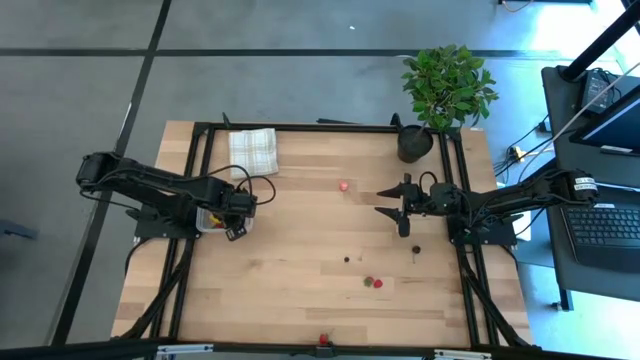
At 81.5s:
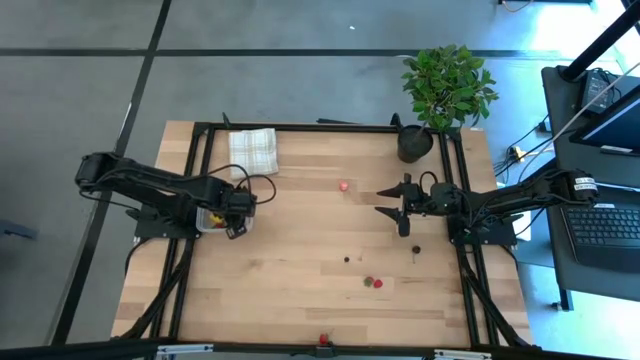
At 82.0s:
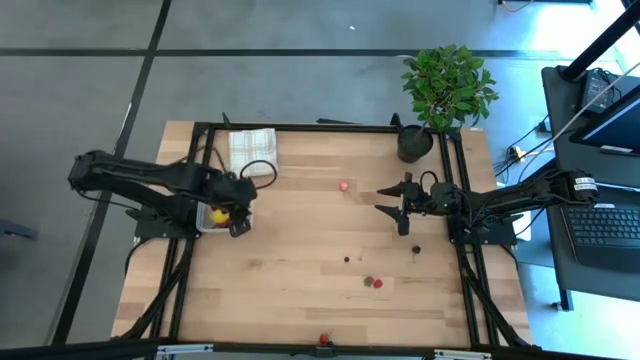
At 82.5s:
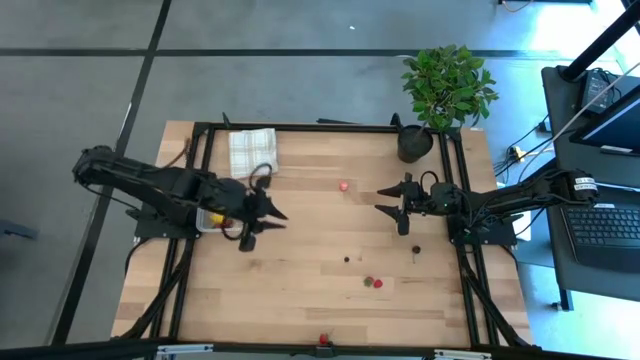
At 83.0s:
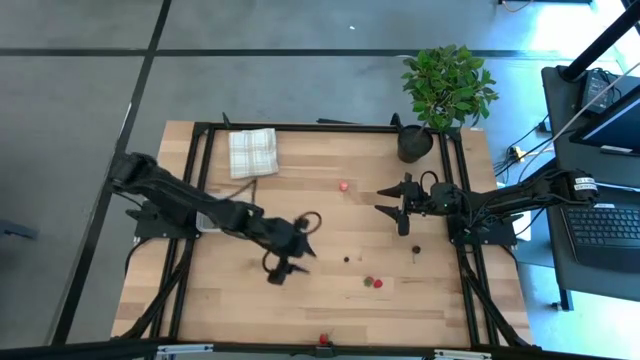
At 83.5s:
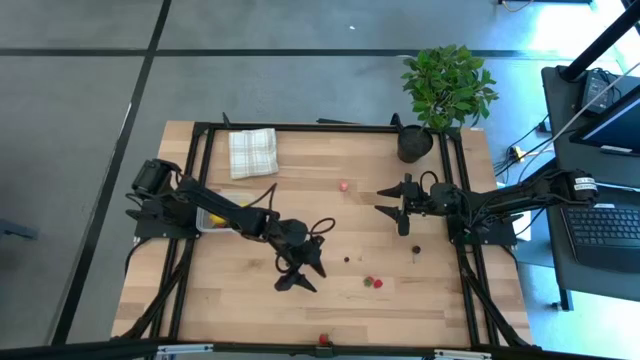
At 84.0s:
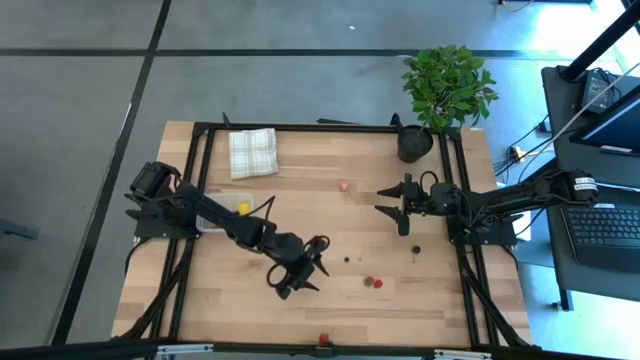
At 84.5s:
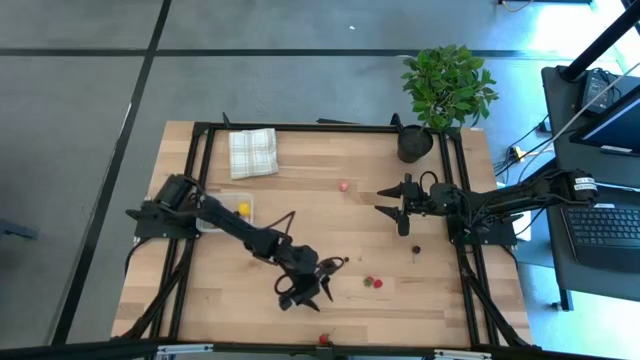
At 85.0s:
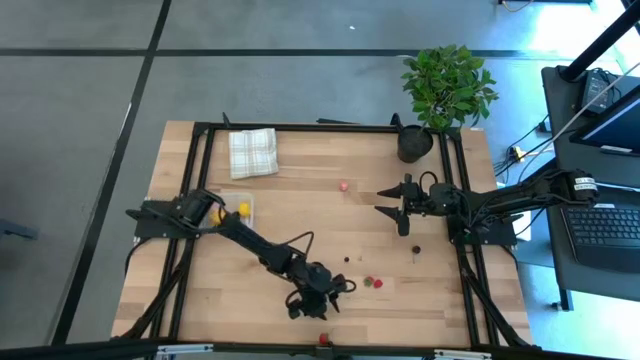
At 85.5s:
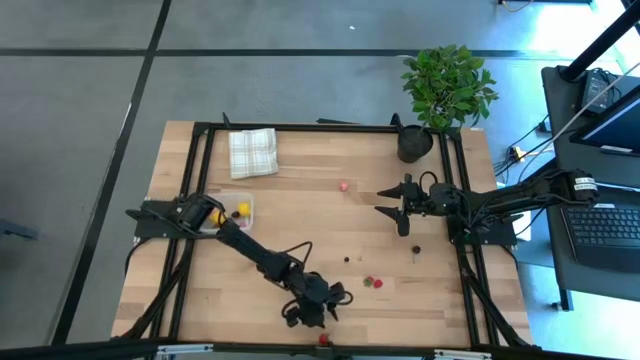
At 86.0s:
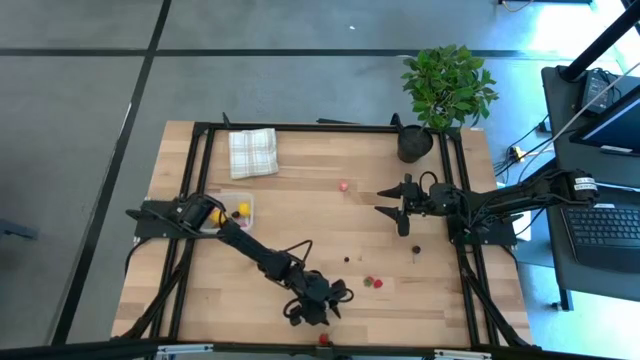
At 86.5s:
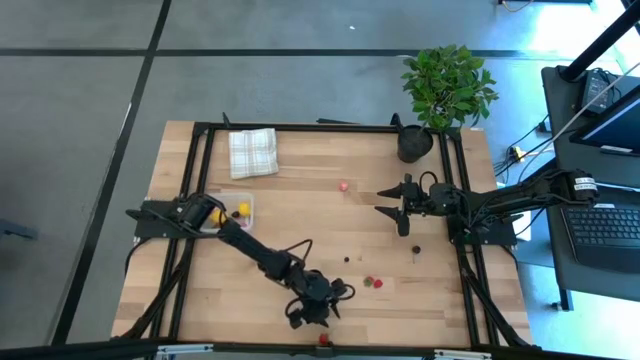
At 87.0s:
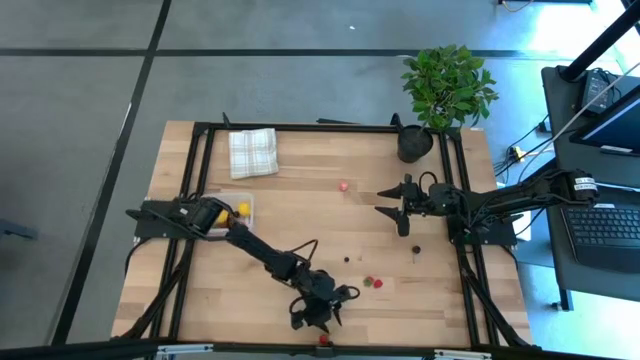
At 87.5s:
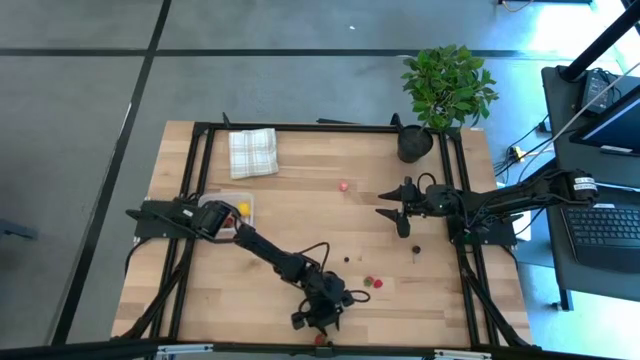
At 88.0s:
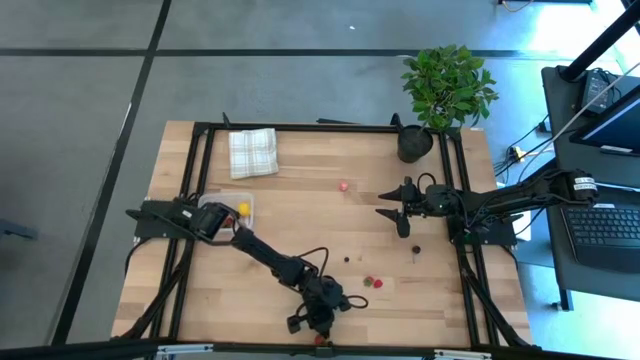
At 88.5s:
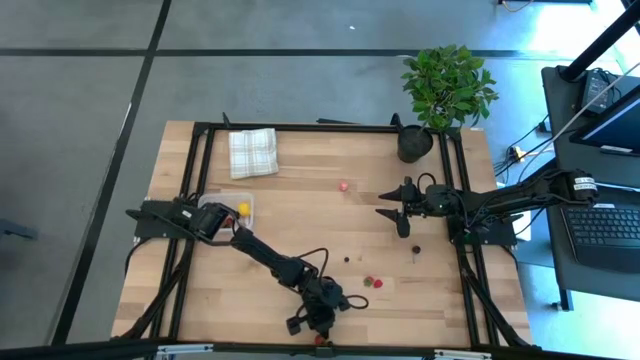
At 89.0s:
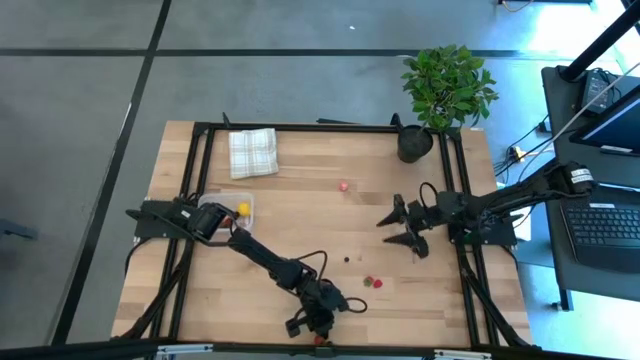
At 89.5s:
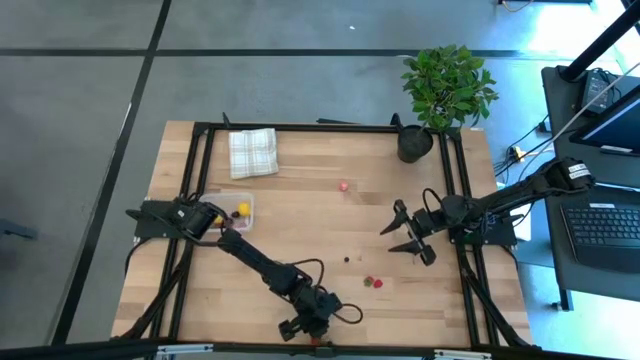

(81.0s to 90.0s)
Task: Pick and placing Produce into tupperware
Put the bottom red strawberry into the transparent bin

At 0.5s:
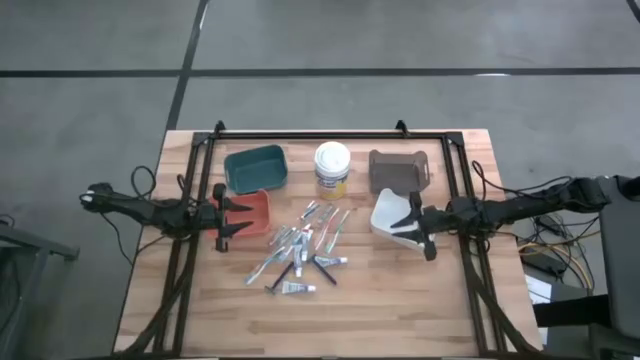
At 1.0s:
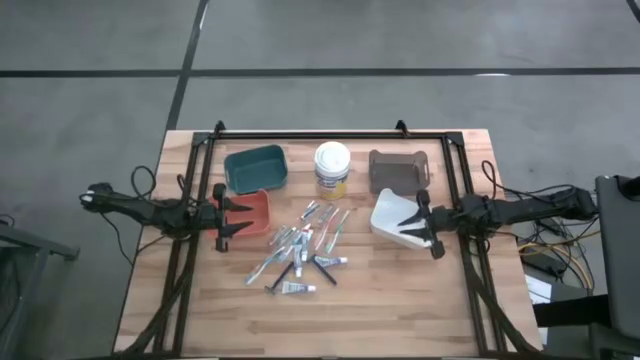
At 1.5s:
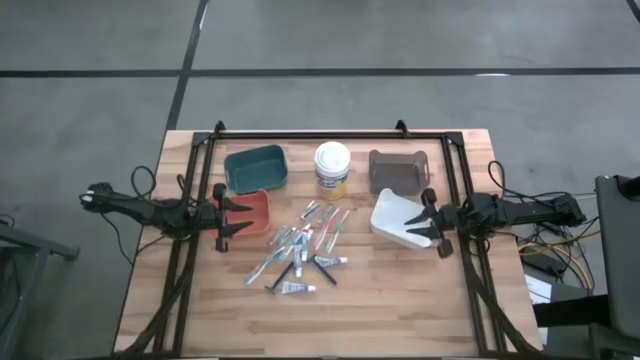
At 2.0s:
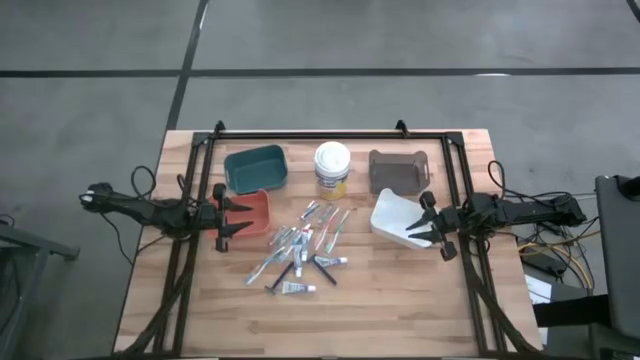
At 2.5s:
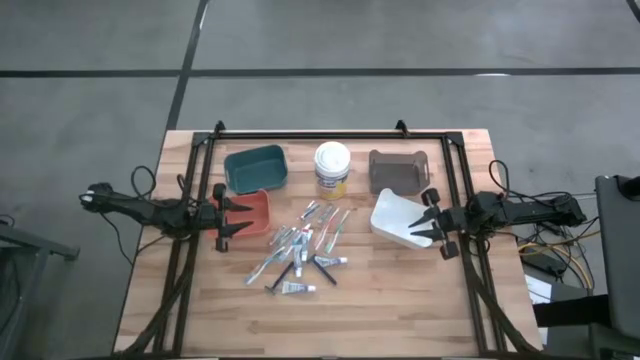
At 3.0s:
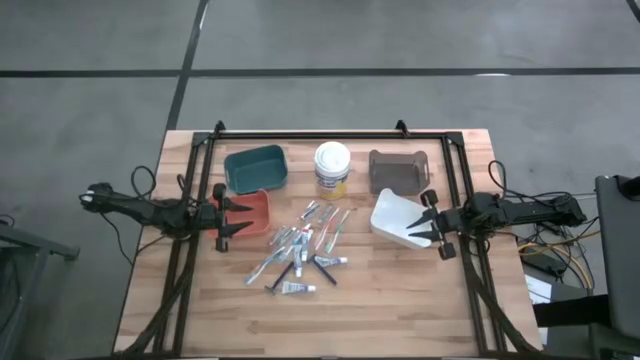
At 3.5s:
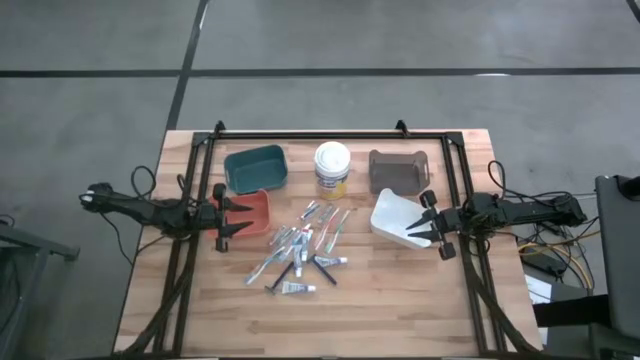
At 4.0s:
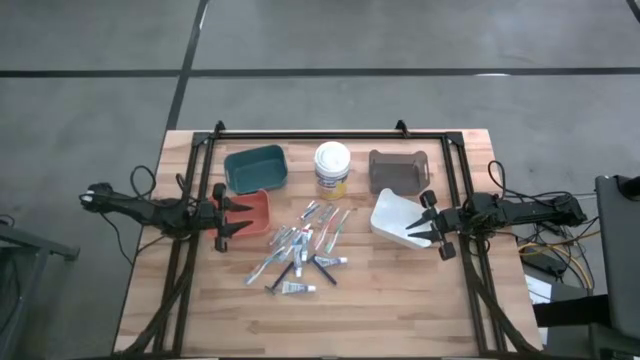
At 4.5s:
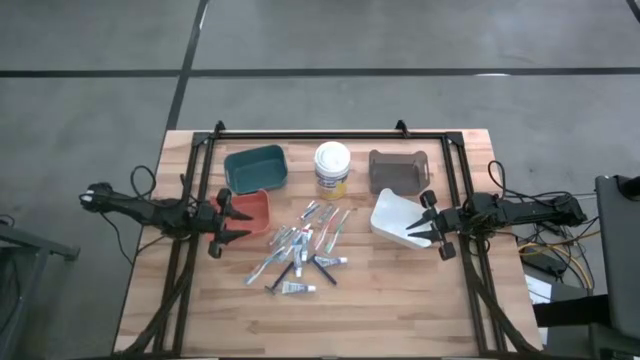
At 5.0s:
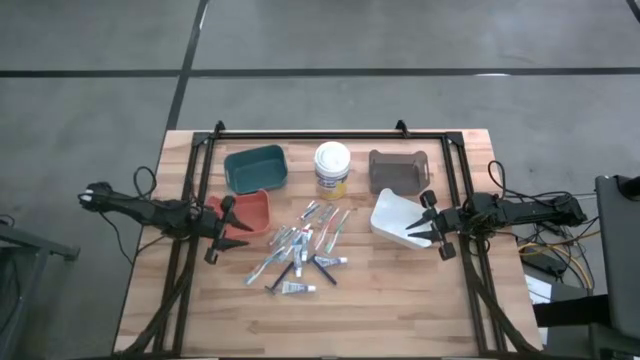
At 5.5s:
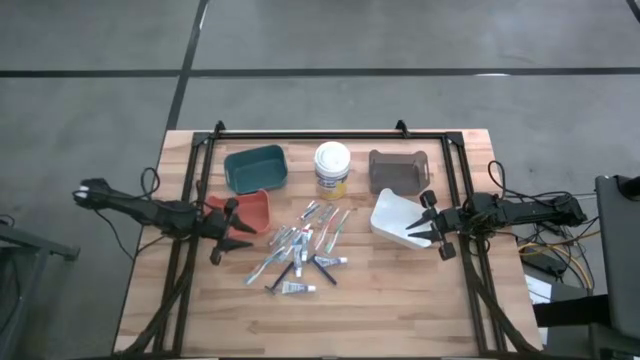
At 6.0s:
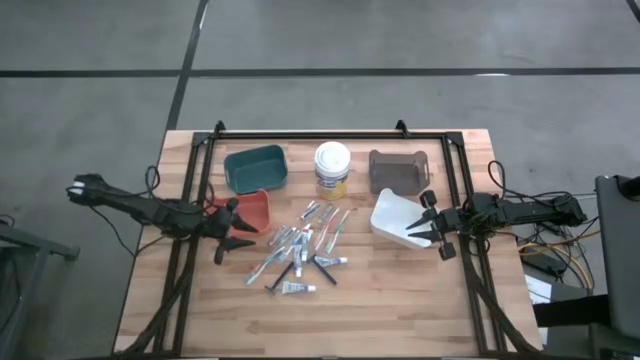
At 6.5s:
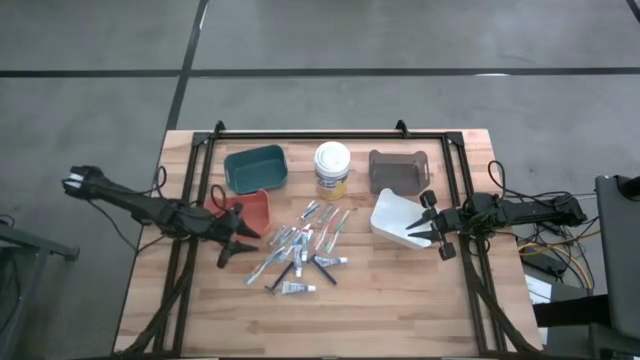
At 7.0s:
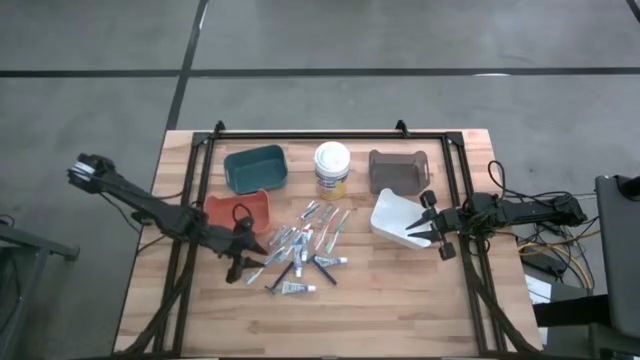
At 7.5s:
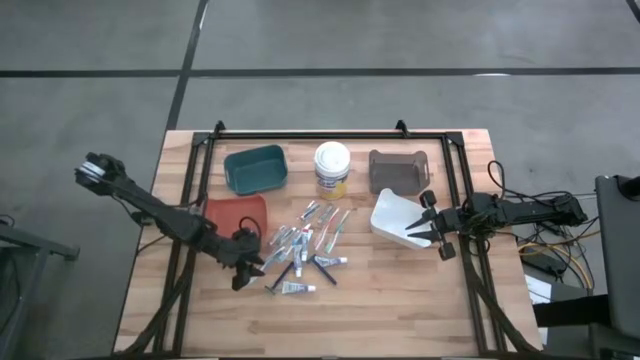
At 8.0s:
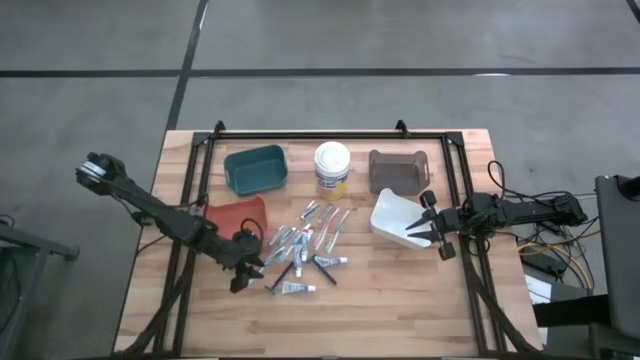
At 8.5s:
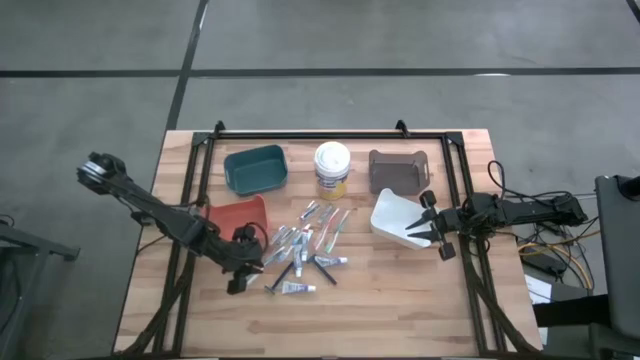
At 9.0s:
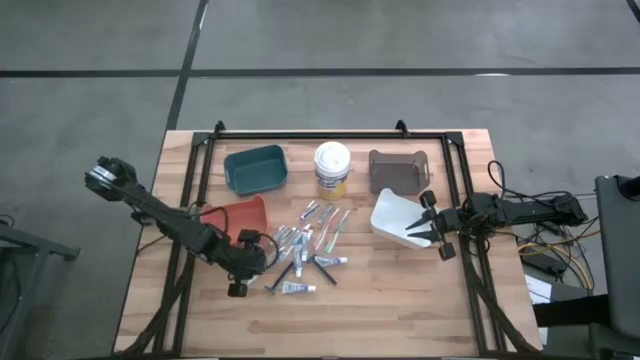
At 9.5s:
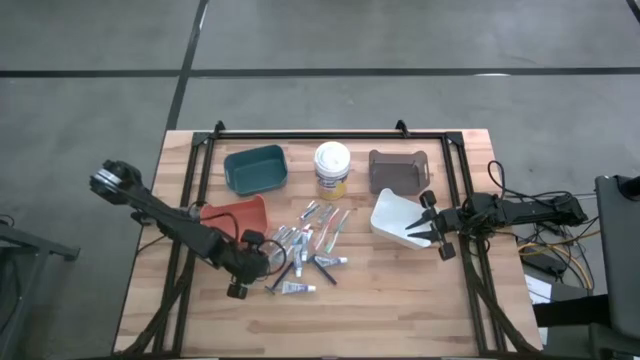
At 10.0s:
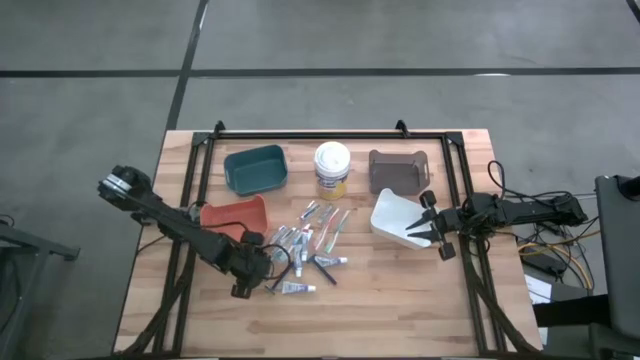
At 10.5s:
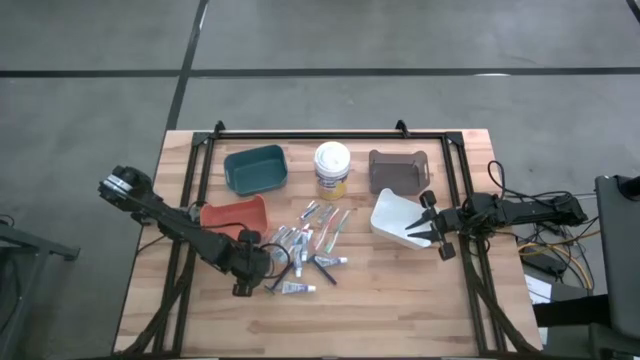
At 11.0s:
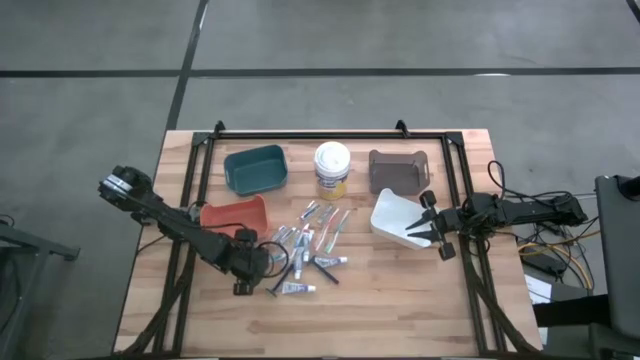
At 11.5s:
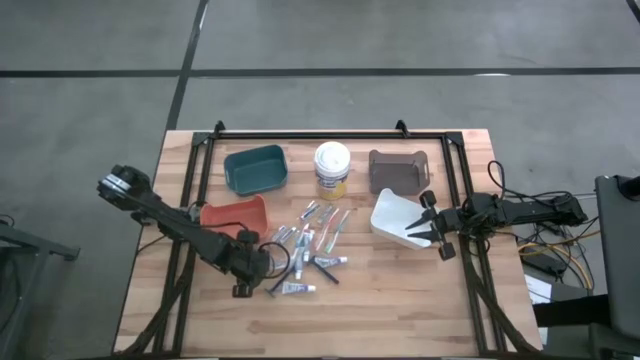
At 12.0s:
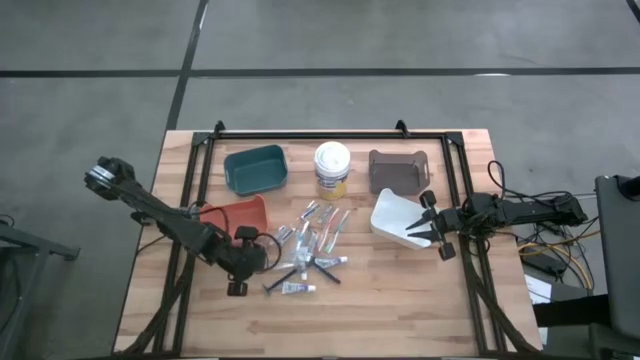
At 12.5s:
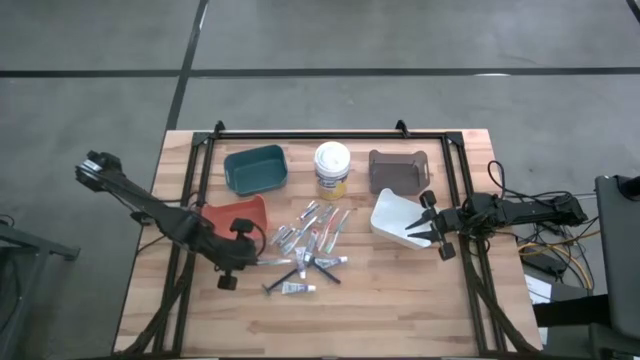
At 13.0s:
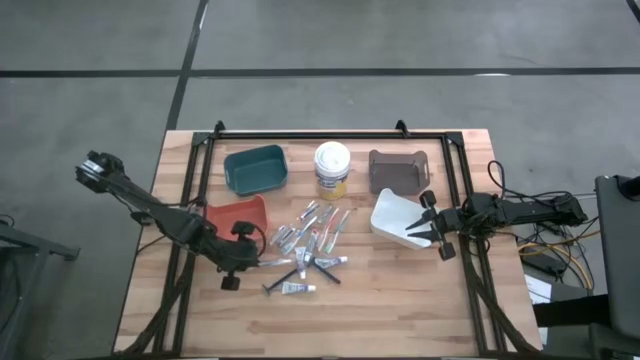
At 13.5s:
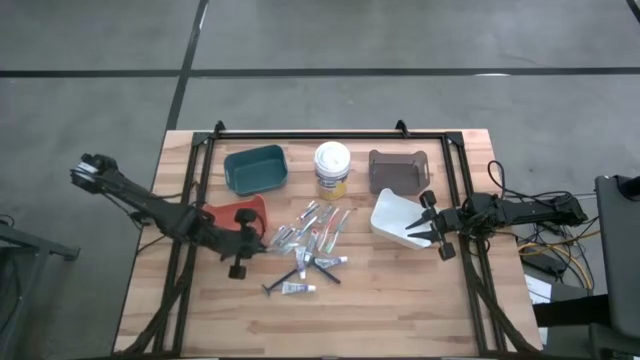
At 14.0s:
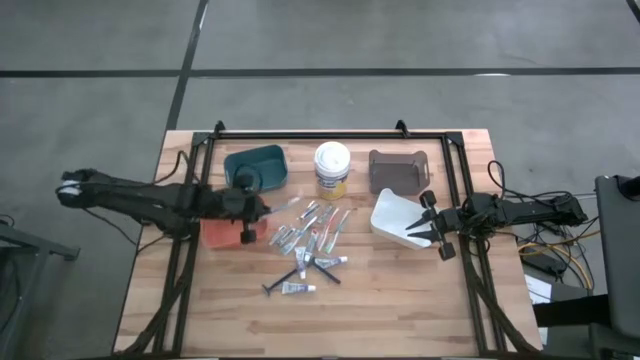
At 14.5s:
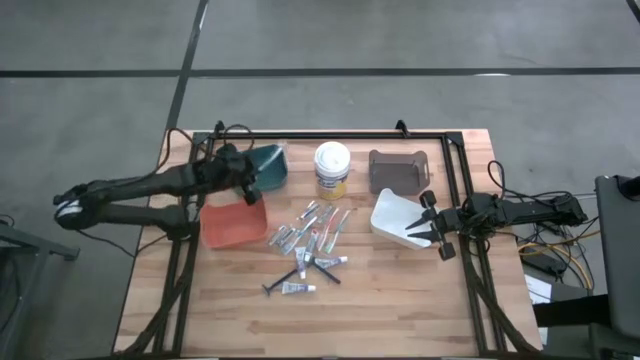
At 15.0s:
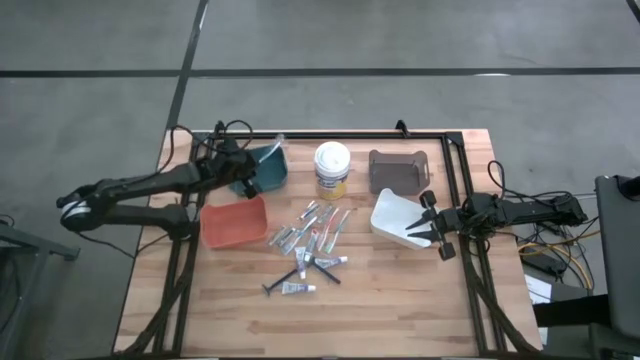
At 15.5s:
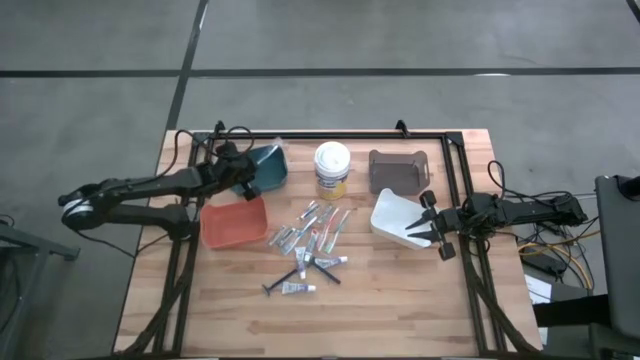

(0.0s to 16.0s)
Task: Pick & Place Travel size toiletries
Put the bottom blue toothbrush into the blue bin
